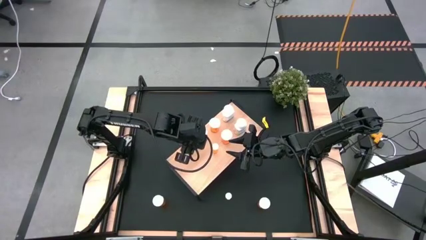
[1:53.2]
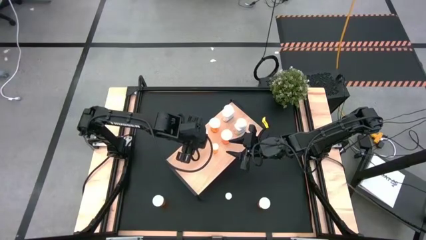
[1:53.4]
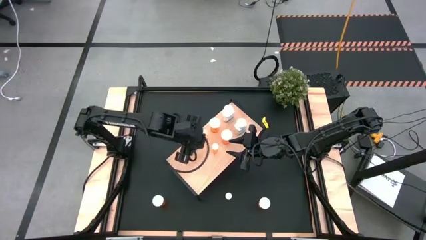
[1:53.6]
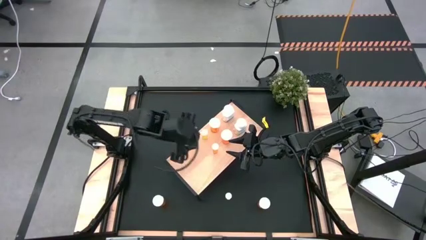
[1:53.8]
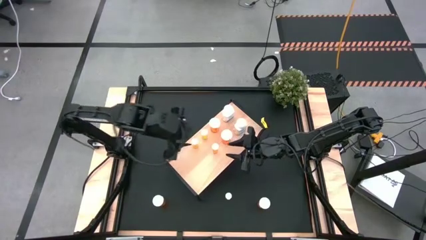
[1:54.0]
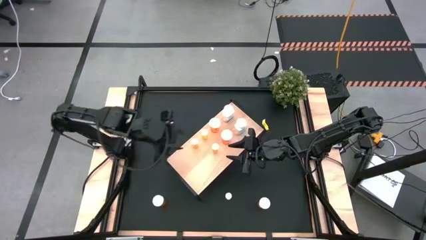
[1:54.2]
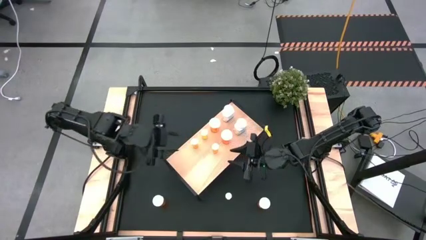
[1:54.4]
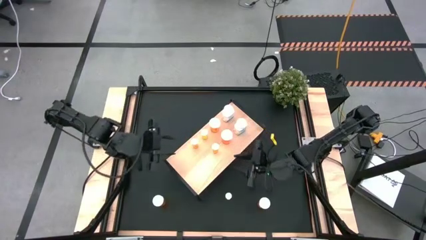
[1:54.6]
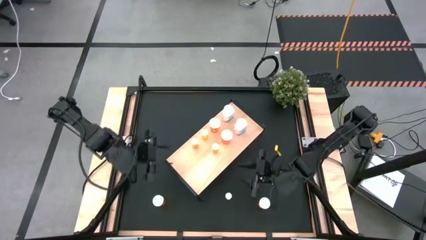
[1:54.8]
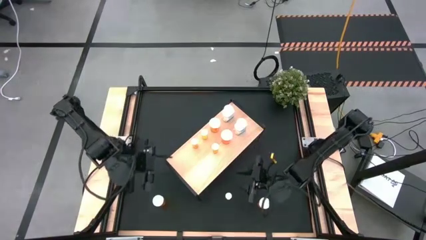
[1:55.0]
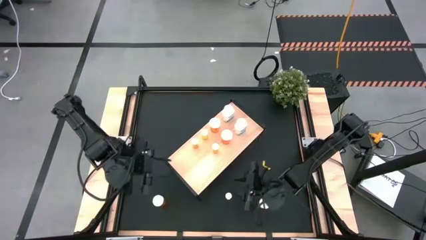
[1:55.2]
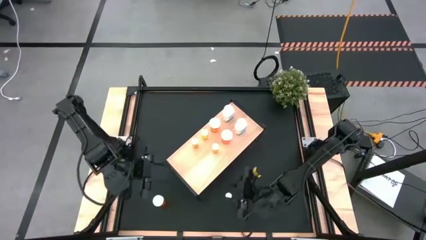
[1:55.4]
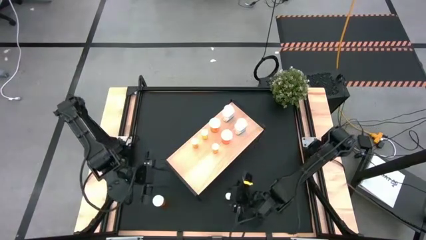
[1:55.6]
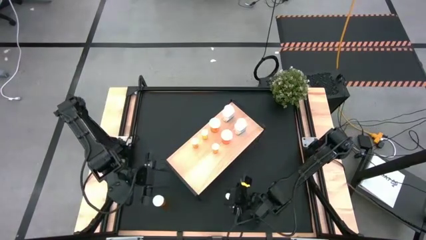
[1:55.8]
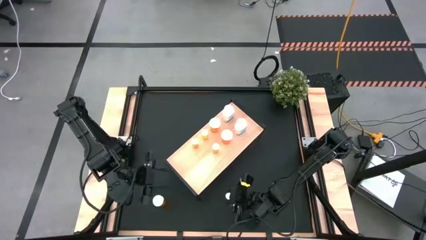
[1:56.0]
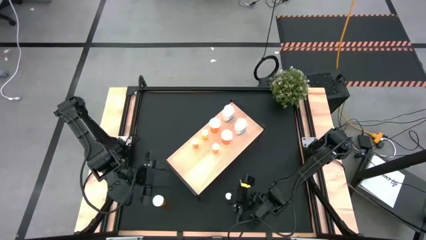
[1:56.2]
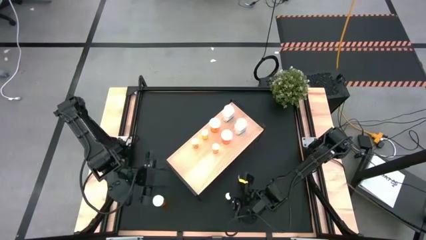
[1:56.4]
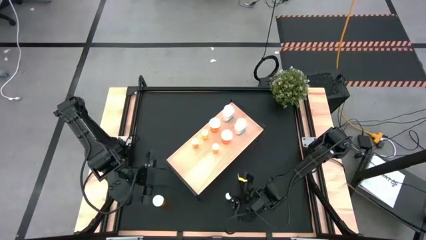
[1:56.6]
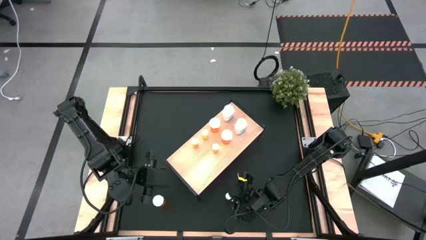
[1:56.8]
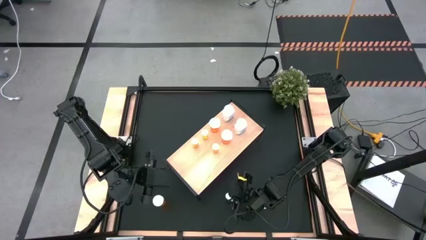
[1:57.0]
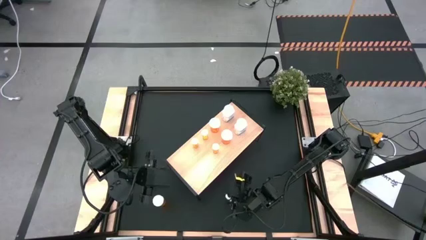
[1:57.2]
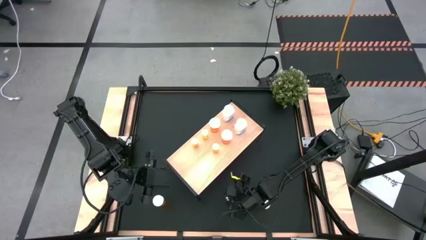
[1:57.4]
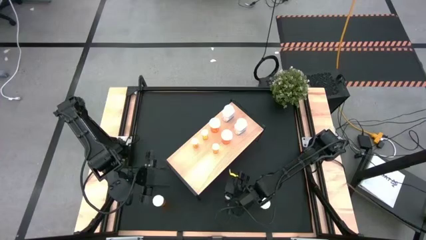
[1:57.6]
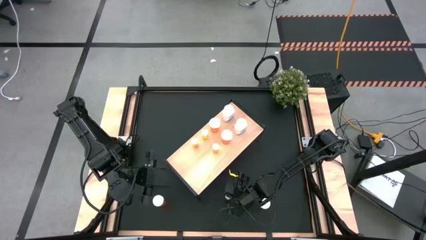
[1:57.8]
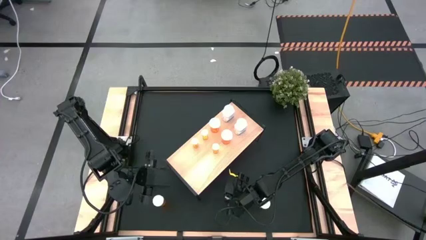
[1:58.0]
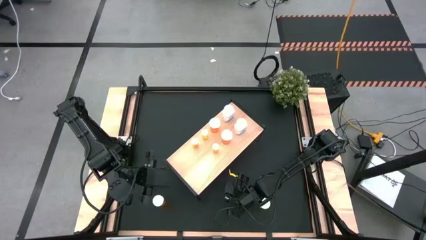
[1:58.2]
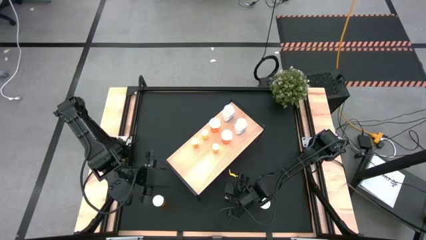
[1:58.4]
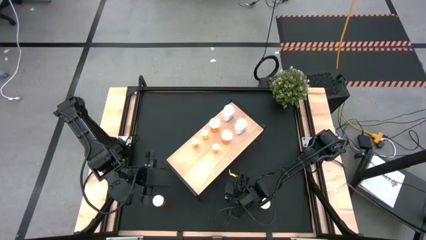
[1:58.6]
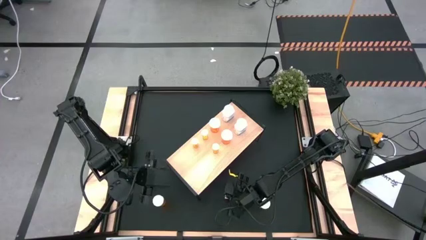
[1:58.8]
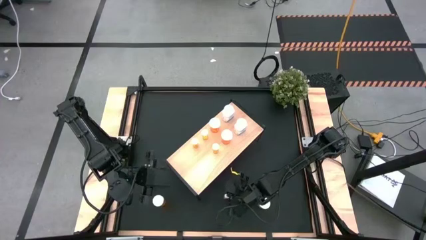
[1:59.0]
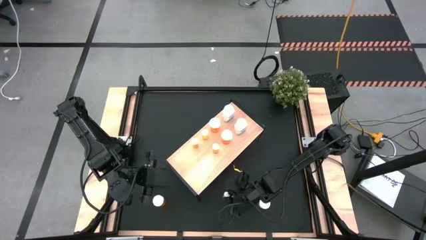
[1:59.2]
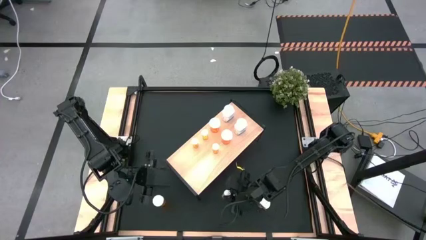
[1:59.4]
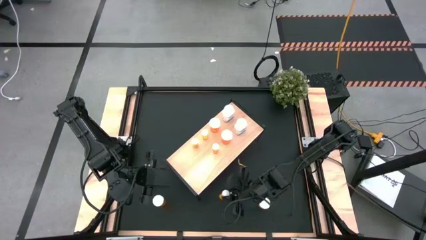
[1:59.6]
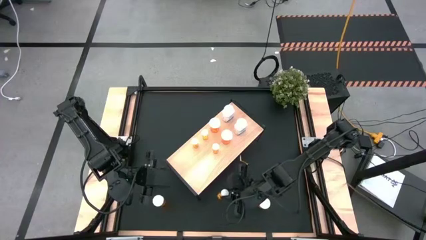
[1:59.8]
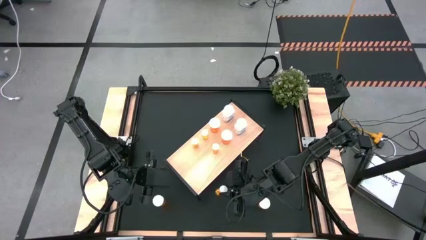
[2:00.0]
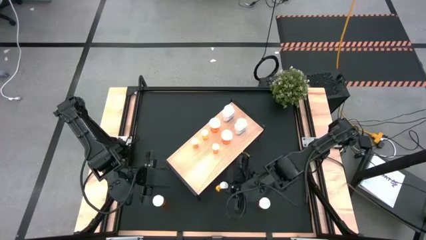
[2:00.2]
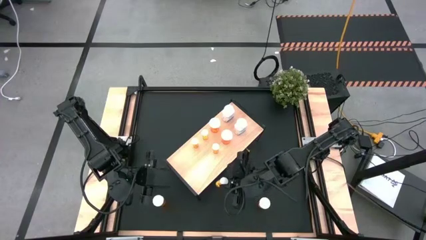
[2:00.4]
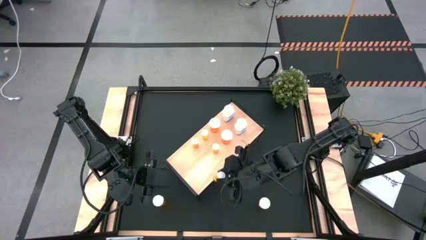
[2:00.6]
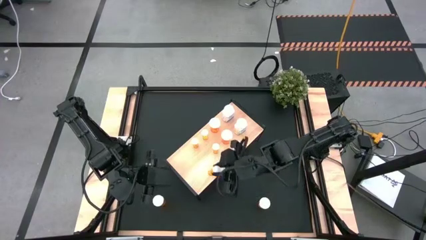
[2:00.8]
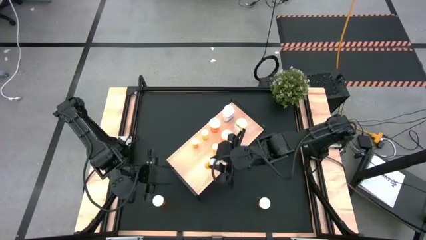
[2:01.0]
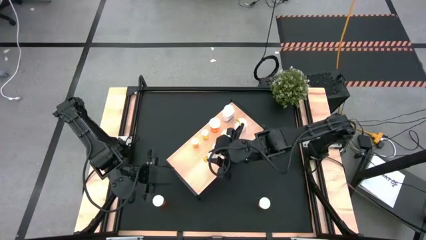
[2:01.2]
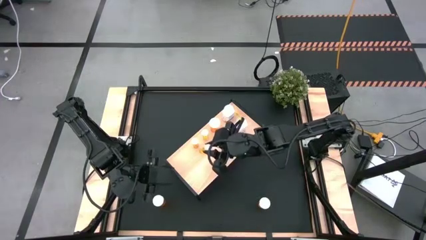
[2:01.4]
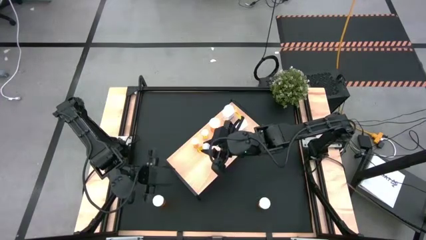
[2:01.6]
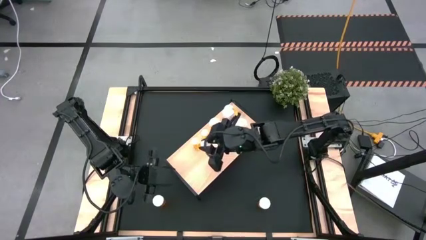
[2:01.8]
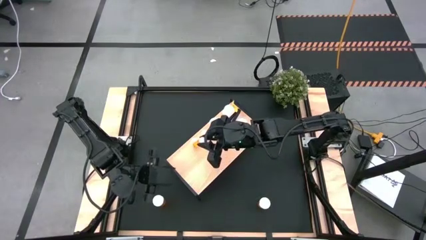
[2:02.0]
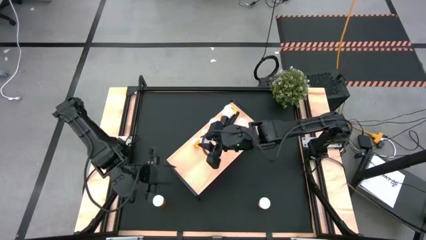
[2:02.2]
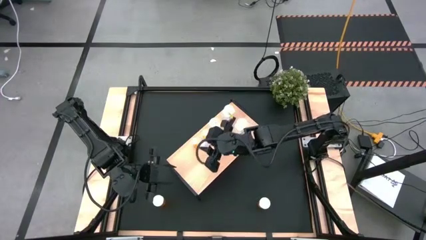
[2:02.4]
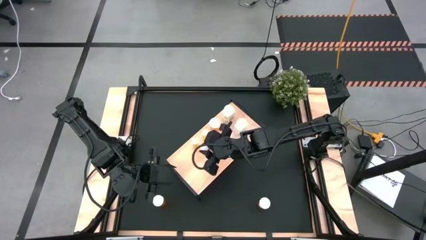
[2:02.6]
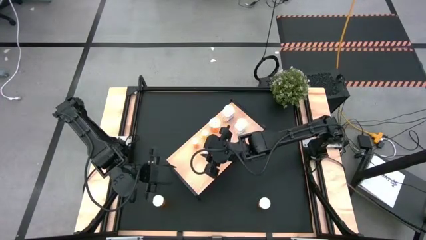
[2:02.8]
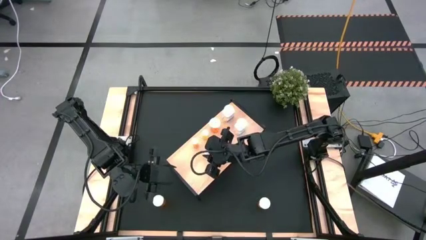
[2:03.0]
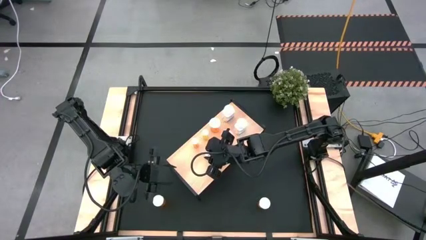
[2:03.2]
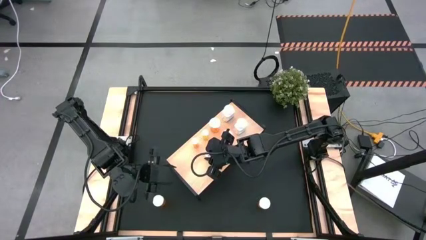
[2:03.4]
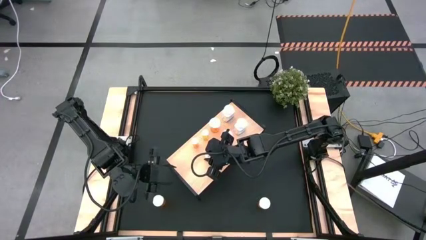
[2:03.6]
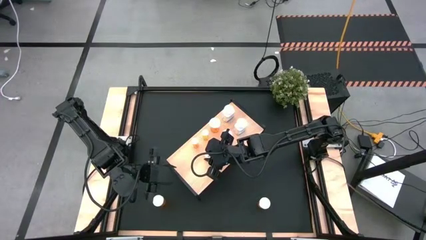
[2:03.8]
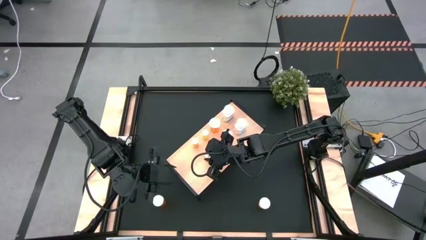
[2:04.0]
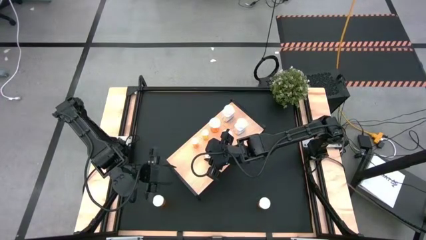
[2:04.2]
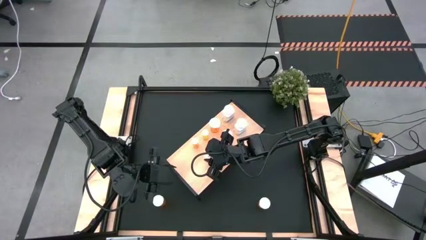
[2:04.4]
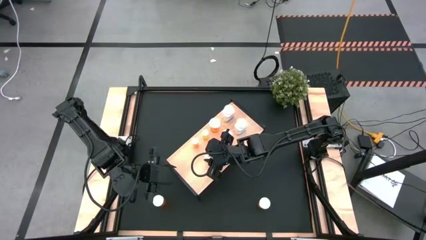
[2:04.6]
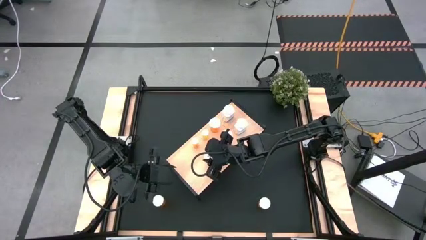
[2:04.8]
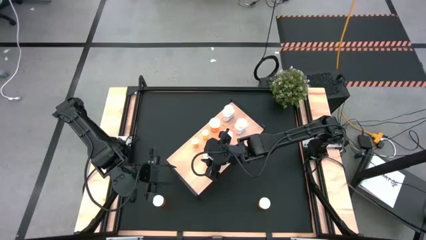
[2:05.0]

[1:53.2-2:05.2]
Task: Pick and place medicine bottles onto shelf by color
Put the small orange pill bottle on the shelf

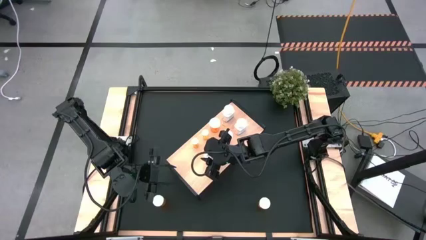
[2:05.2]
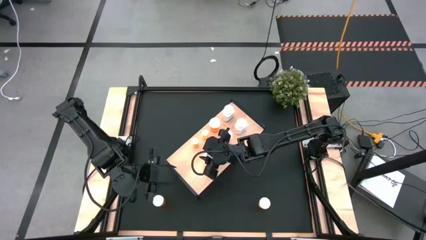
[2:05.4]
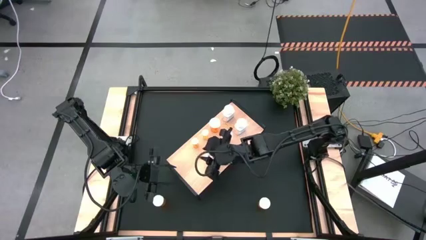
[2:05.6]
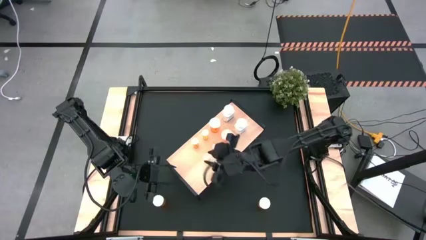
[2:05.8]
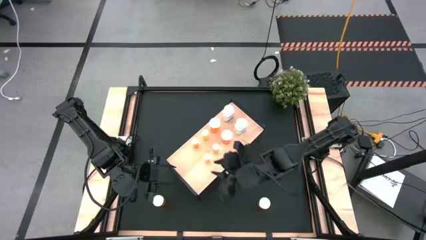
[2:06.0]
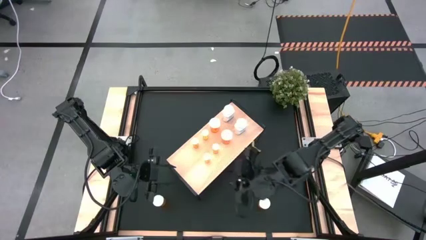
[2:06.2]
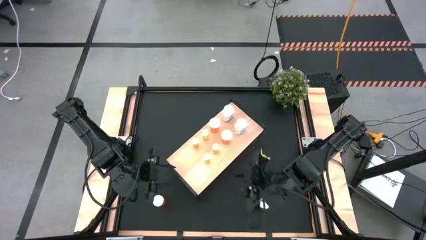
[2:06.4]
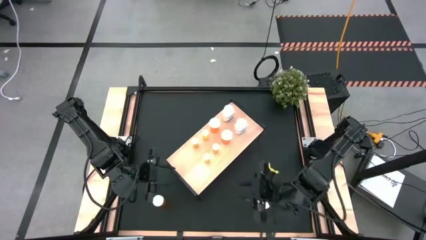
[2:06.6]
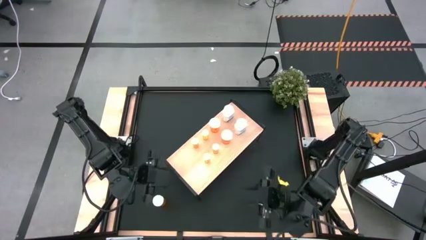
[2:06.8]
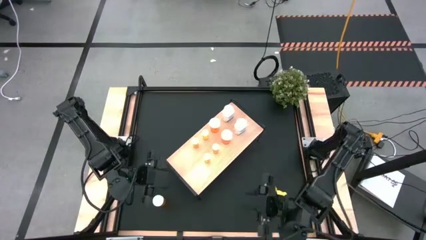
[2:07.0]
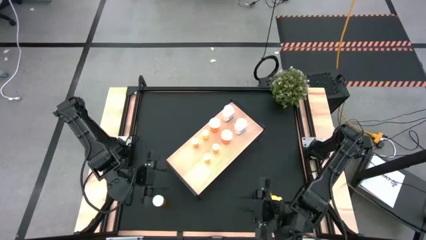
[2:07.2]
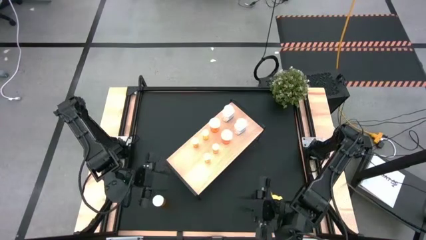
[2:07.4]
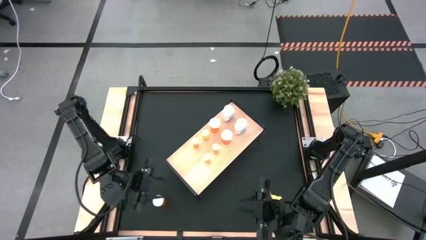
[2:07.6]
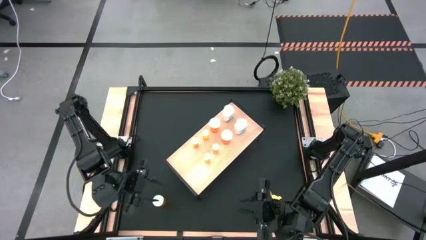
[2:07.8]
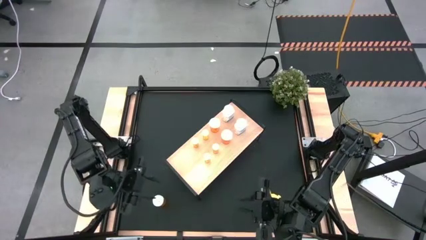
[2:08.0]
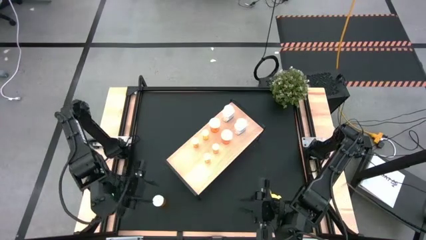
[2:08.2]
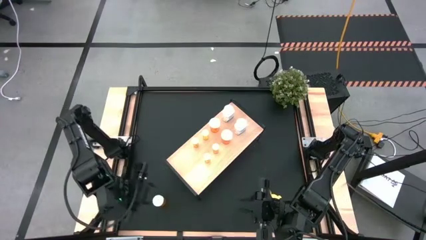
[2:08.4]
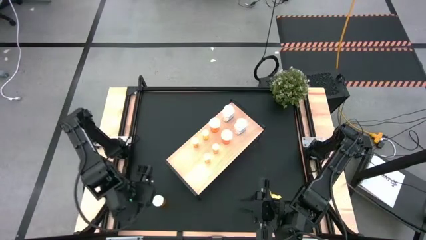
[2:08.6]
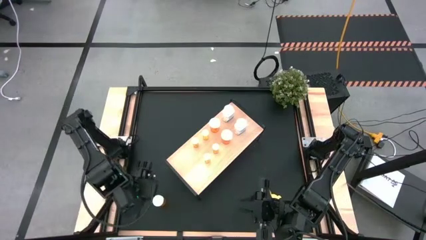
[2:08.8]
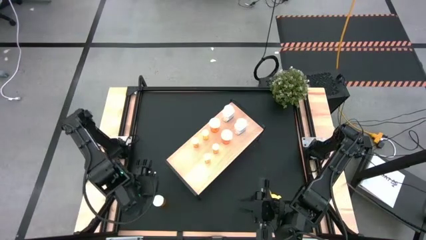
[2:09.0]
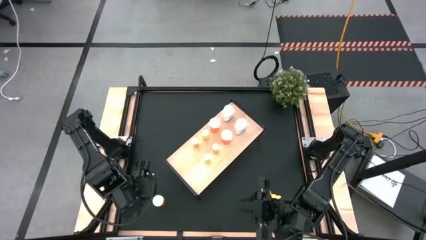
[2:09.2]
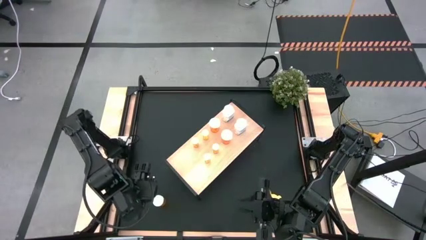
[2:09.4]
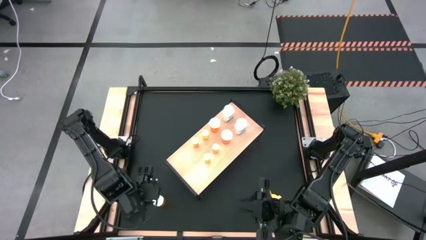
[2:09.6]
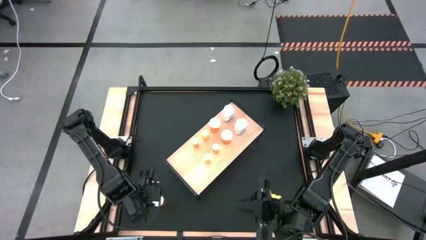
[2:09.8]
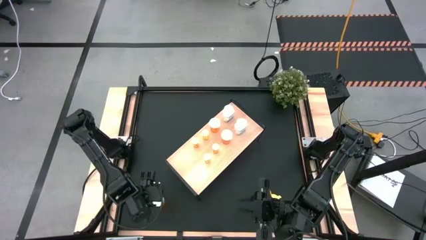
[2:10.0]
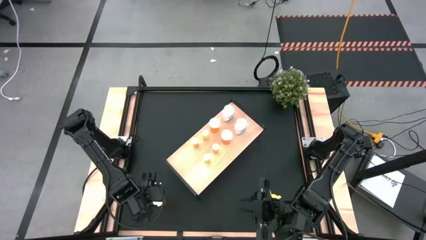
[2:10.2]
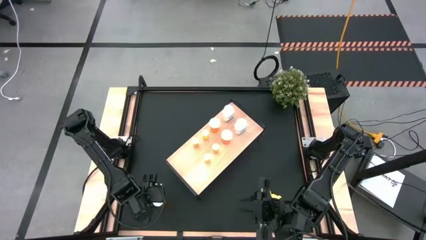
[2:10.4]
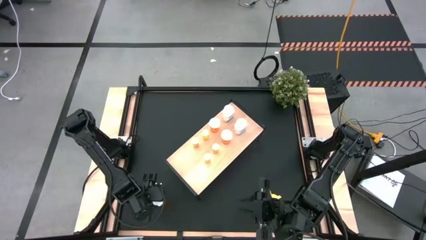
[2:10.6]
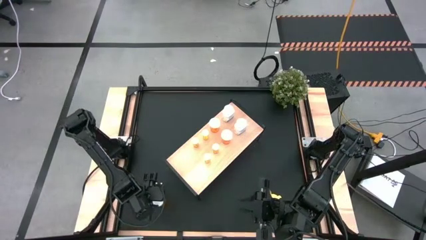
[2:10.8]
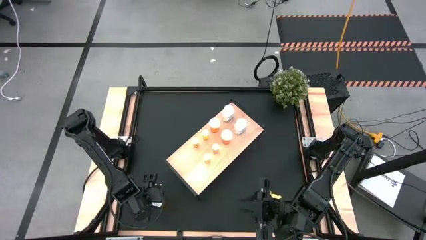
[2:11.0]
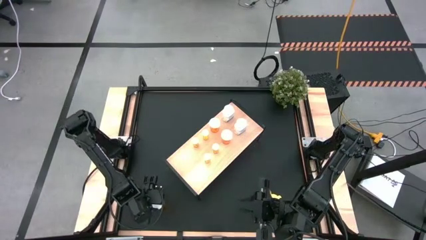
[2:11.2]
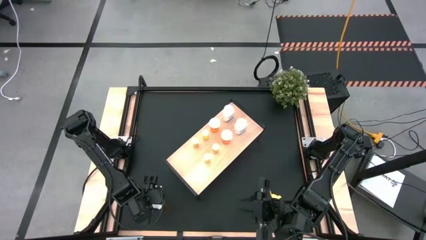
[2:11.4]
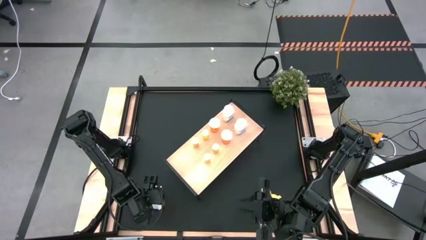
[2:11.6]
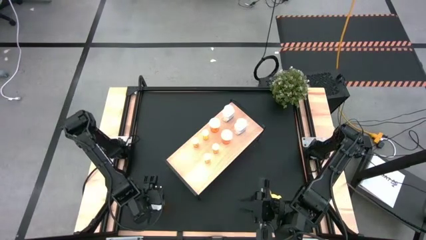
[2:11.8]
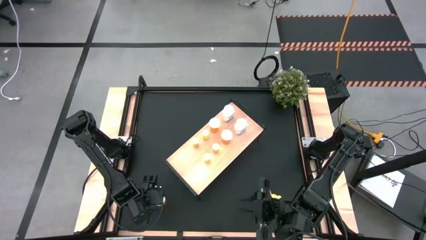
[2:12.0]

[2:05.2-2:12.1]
Put the large orange pill bottle on the shelf
